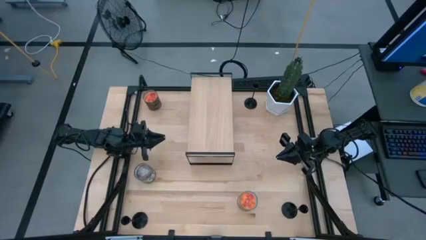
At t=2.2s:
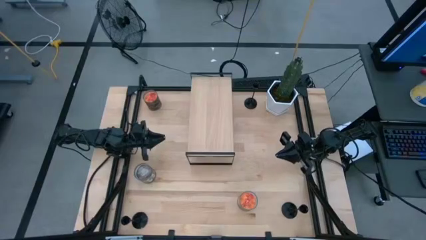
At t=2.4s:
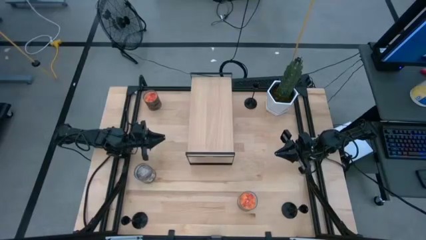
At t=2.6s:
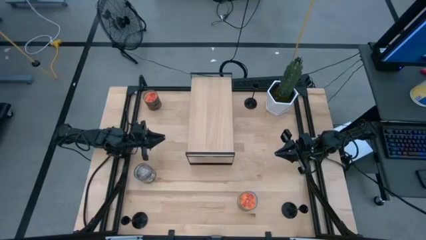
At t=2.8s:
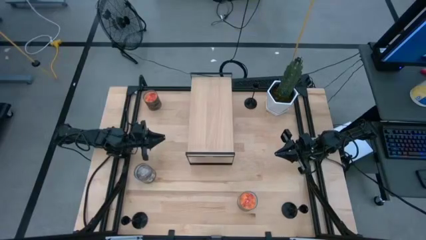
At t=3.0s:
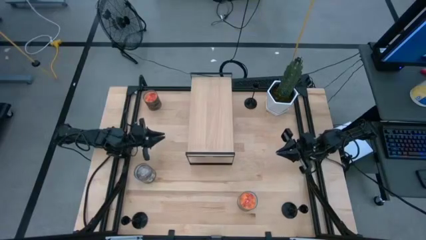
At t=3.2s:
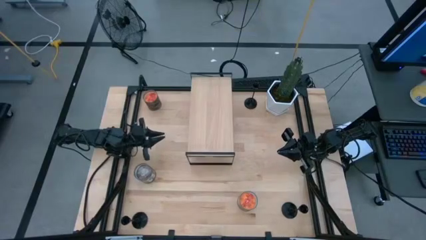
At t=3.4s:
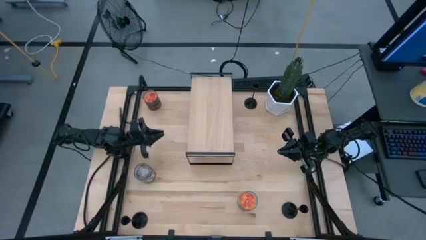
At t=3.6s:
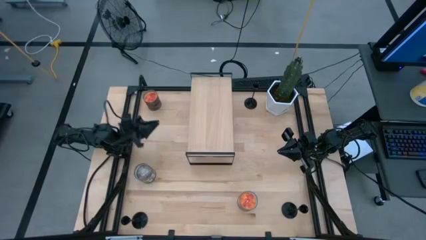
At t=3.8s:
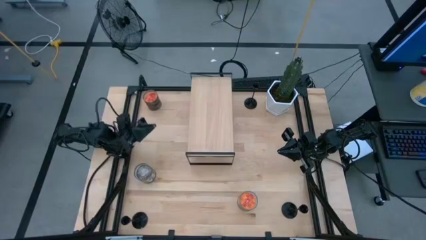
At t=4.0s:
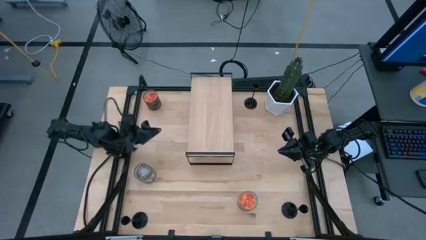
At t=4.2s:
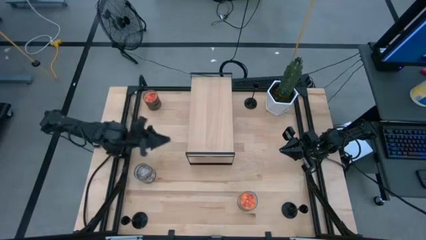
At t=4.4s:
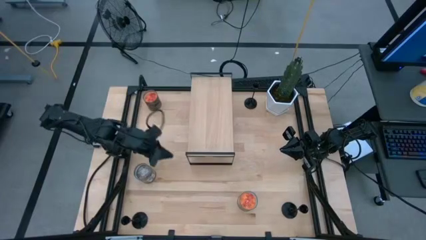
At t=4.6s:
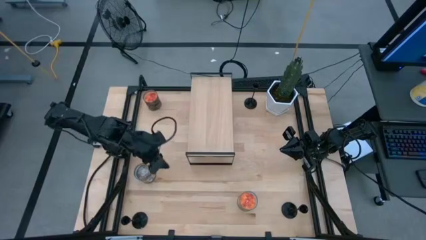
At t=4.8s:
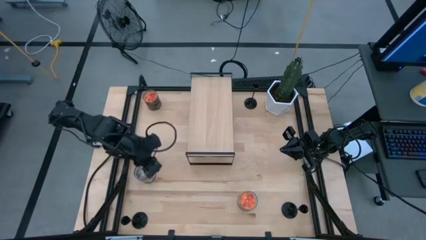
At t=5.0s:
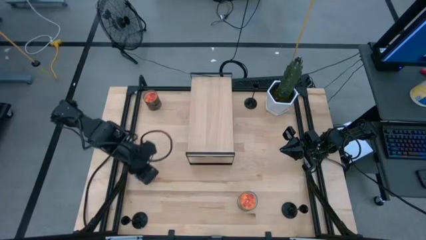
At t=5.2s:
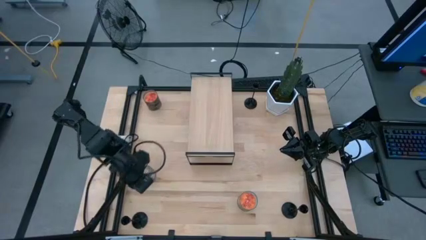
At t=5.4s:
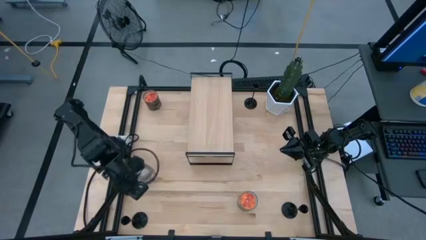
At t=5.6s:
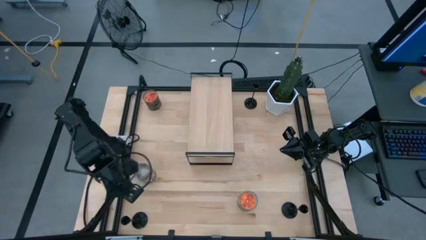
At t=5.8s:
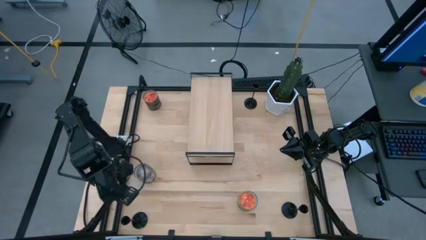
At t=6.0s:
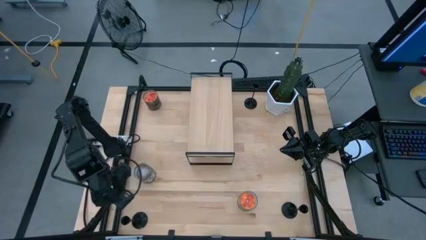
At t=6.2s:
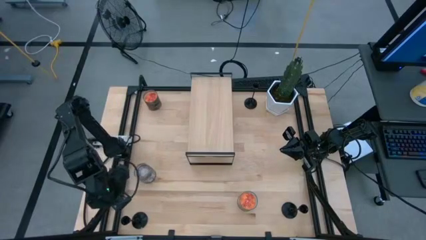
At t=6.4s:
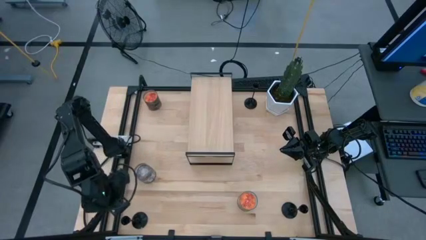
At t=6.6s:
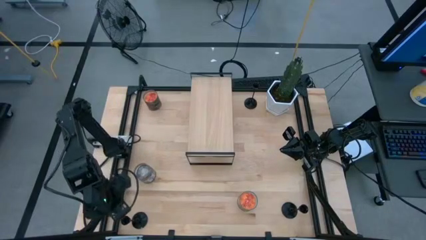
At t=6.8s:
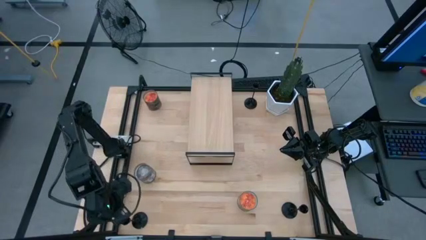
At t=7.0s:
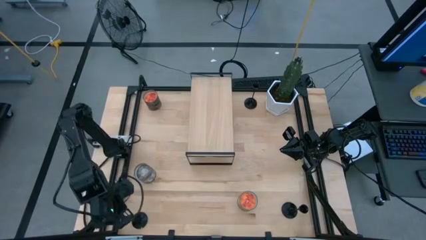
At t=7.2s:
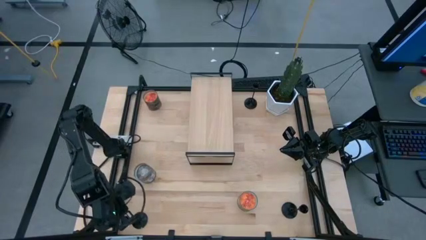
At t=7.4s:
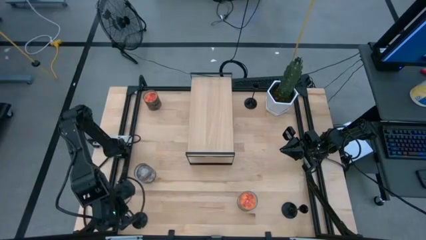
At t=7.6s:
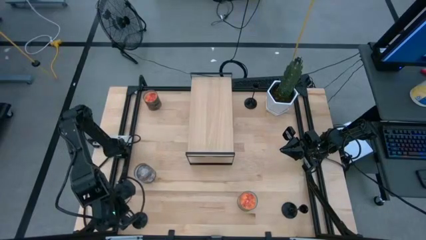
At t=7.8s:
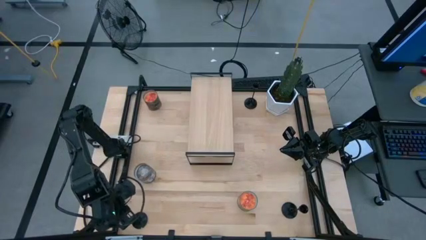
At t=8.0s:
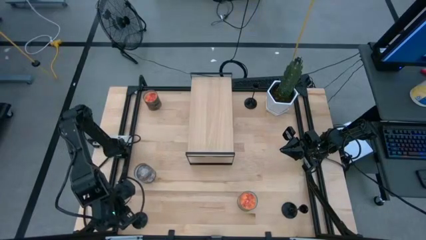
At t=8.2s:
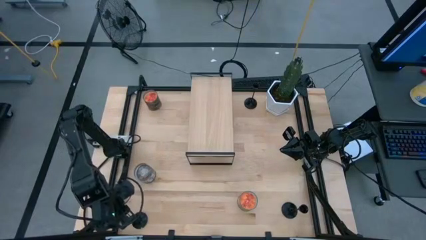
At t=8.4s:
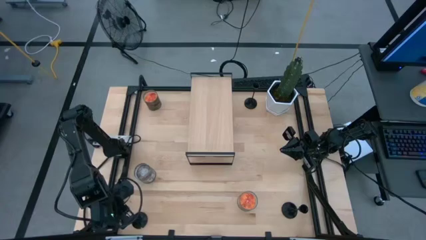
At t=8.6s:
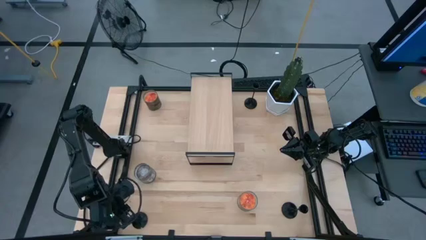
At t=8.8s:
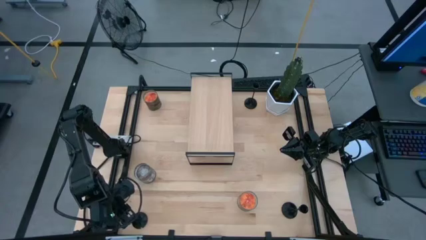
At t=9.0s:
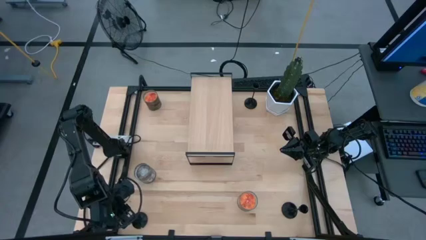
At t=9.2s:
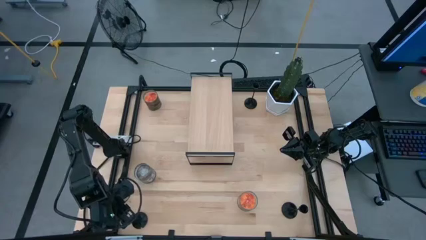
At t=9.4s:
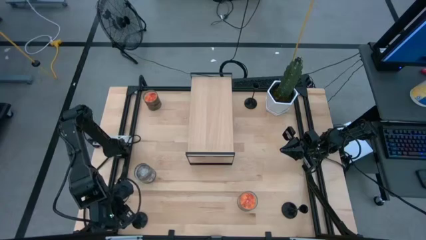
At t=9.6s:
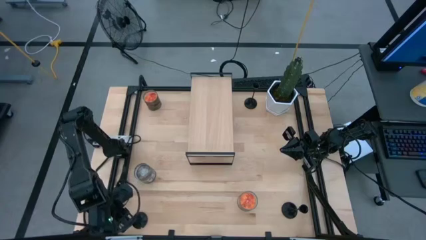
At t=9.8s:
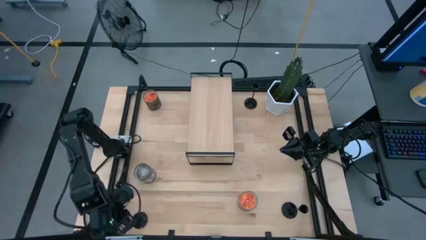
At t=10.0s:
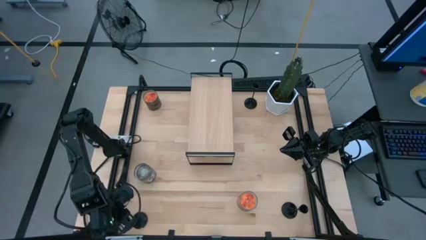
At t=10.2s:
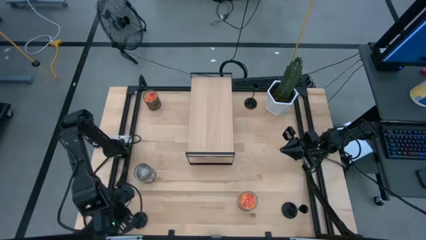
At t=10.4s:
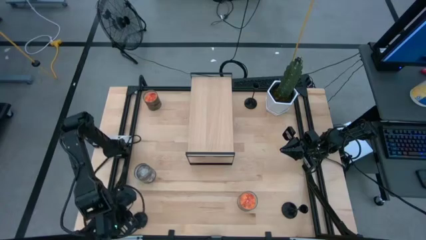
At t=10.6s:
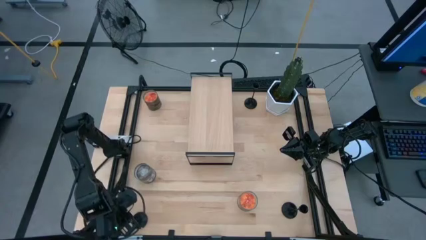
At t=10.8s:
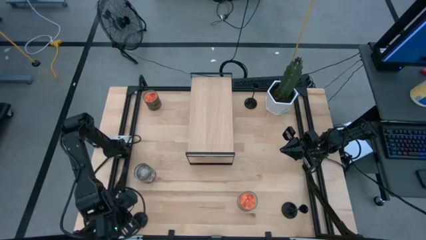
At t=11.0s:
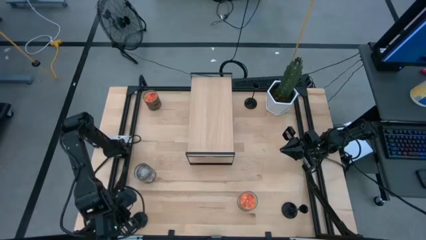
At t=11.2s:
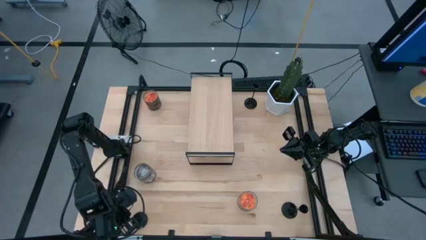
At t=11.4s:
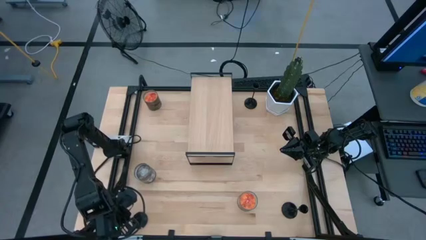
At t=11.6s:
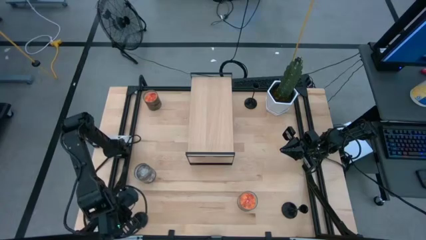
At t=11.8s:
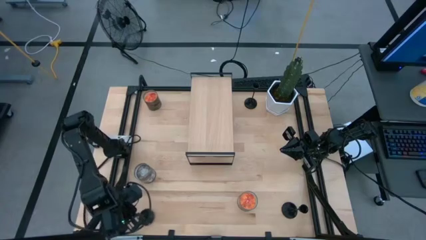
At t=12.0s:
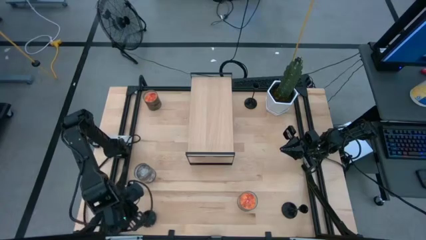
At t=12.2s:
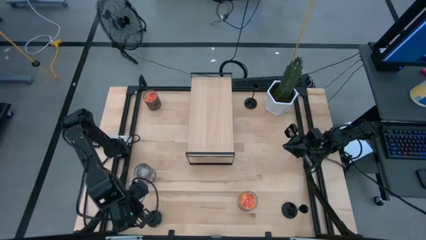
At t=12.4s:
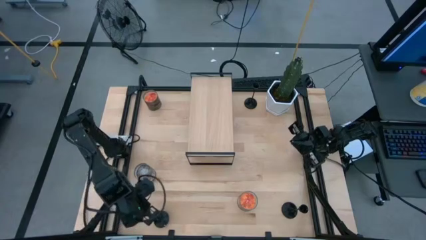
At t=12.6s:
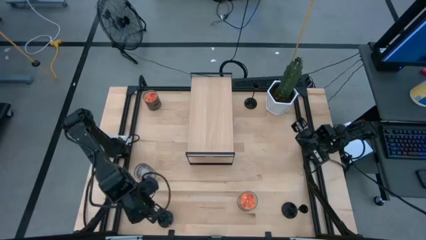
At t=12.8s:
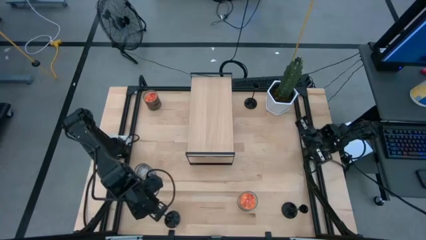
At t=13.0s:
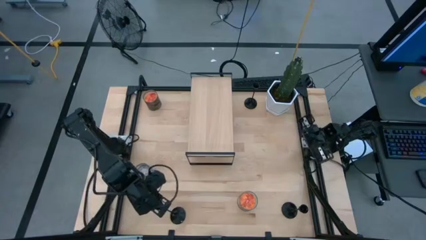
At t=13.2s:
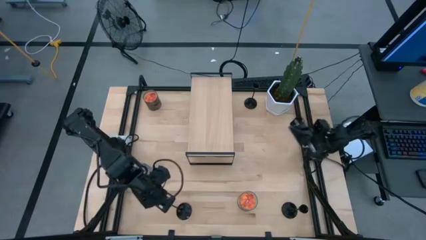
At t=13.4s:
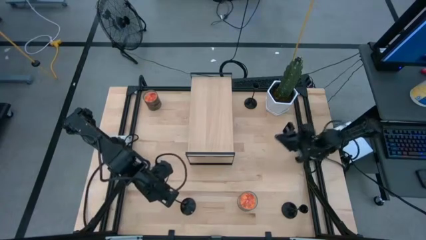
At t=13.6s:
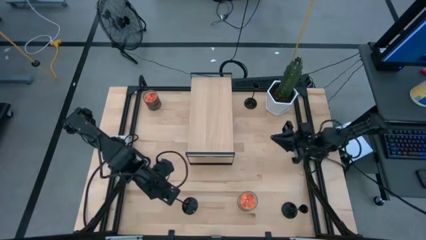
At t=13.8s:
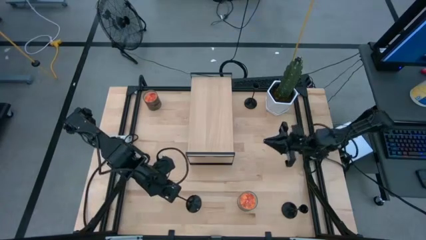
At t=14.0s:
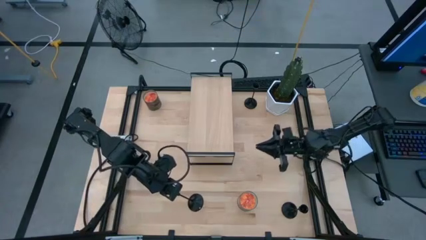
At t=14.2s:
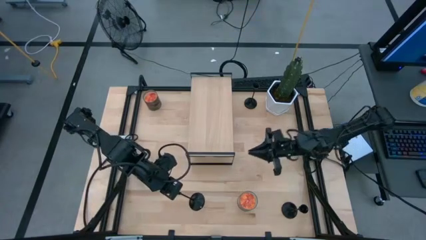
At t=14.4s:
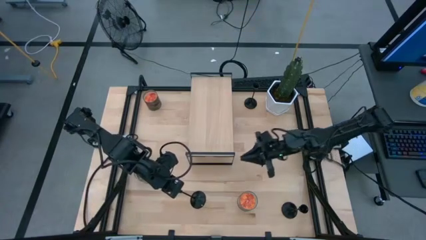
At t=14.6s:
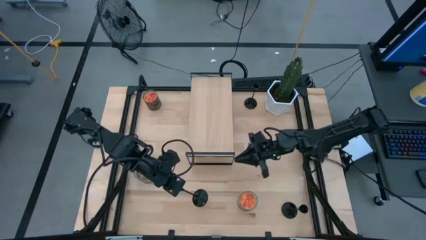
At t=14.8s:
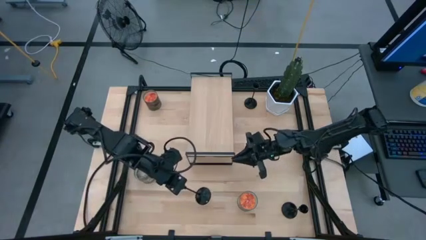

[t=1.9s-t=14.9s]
Task: Pick & Place candle stick holders
Put the bottom left black candle holder on the shelf

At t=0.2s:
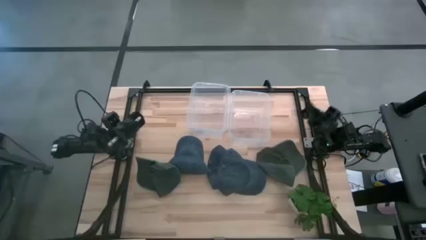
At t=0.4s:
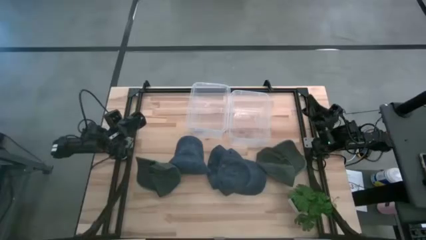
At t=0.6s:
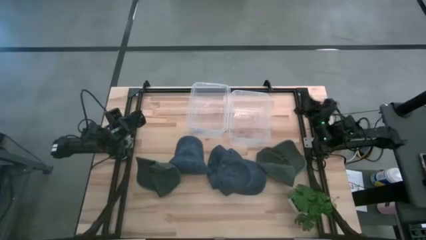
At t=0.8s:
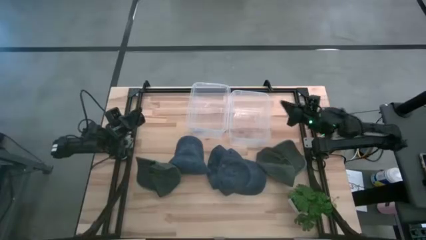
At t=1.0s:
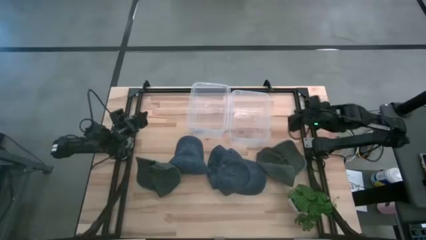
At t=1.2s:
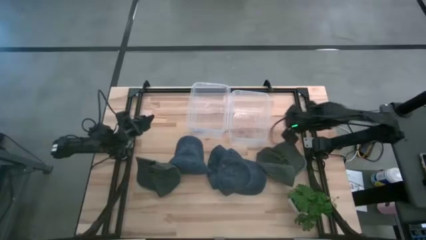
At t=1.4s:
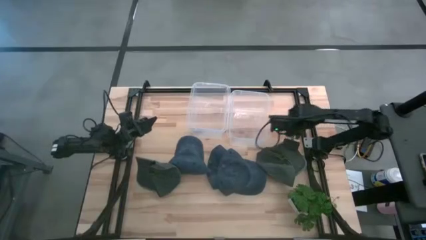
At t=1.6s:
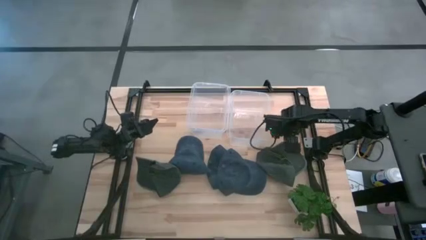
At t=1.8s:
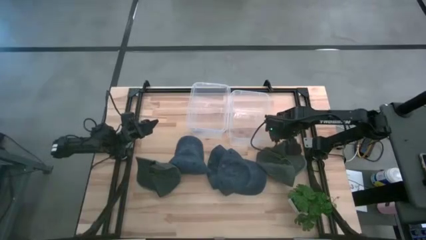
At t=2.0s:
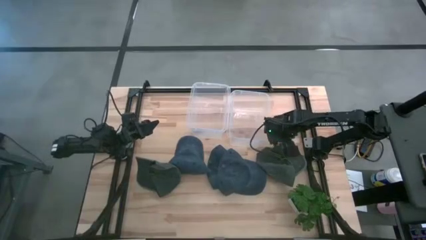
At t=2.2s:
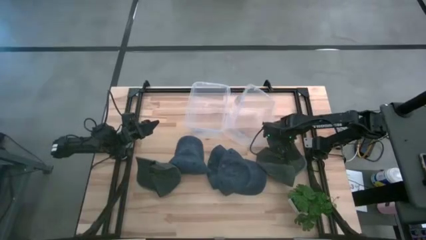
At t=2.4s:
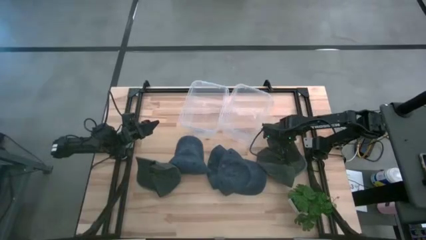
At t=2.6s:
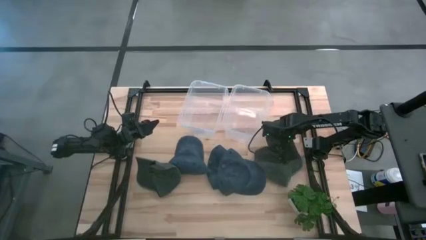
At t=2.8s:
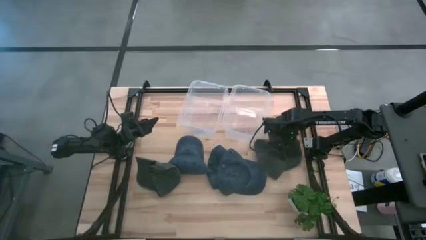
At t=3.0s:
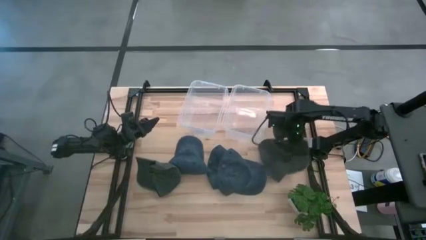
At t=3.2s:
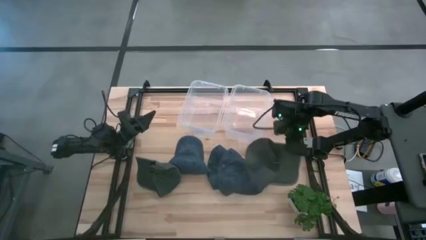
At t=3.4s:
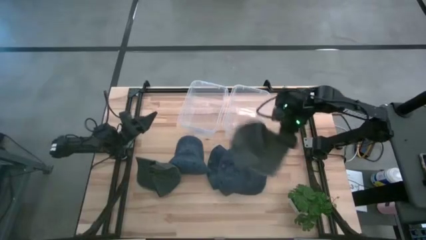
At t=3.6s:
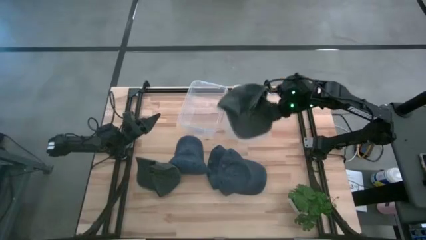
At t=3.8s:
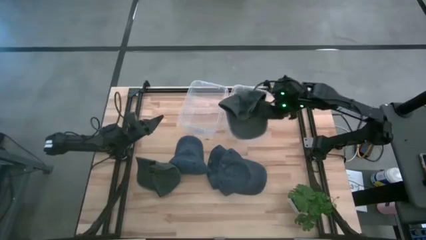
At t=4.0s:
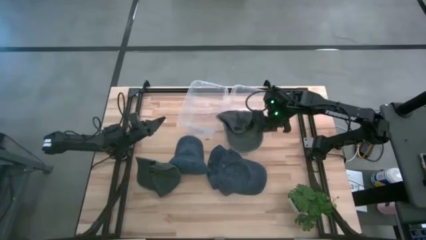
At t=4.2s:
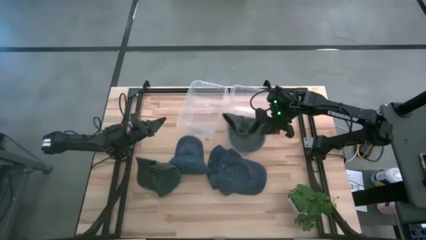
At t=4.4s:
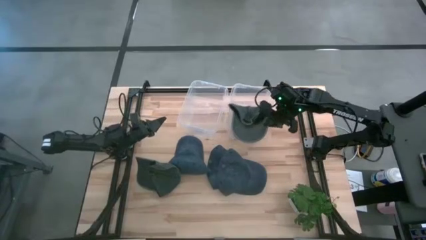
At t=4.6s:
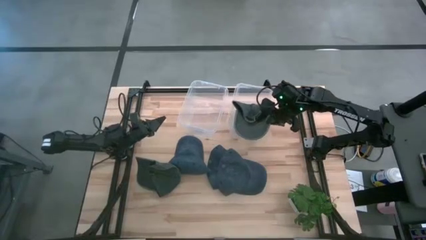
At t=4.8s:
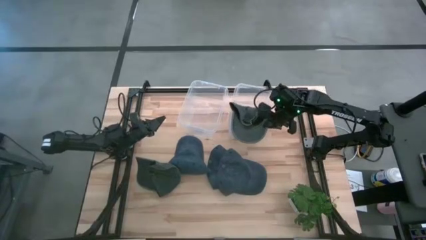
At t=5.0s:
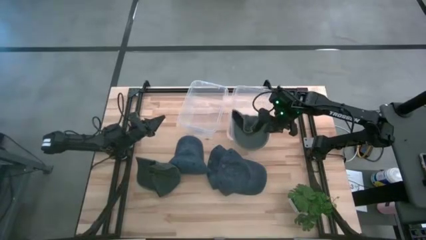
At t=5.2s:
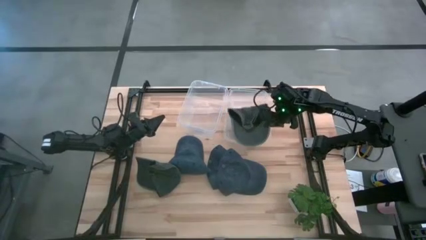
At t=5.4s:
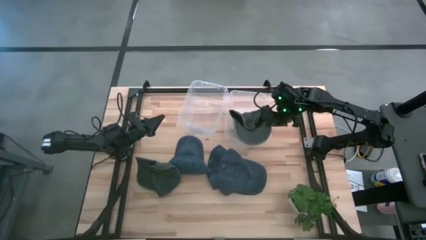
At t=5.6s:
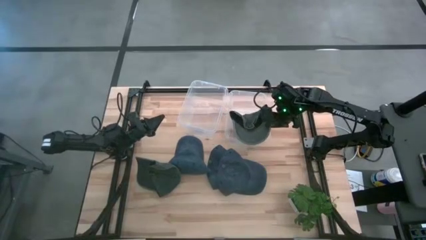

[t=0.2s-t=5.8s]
Task: Pick & Place hat
Put the right green cap into the right transparent bin
